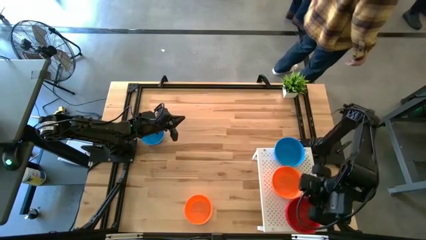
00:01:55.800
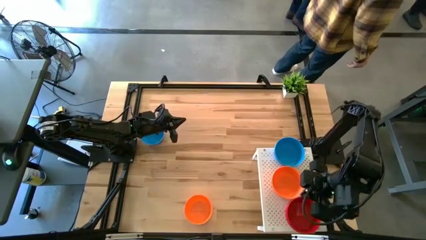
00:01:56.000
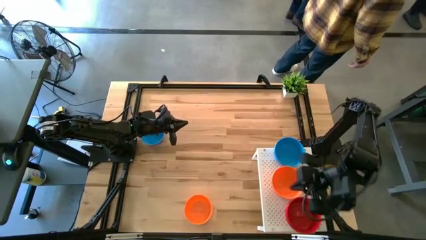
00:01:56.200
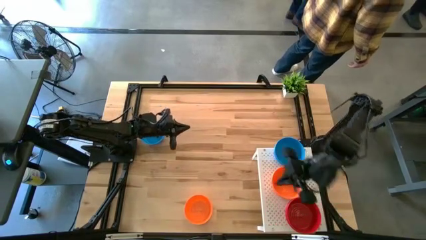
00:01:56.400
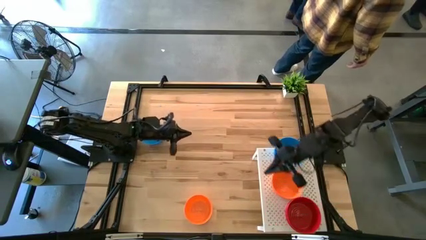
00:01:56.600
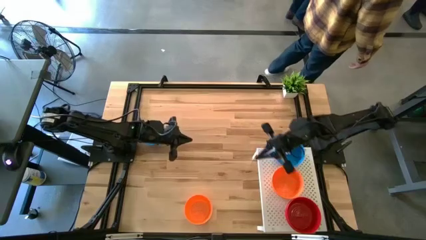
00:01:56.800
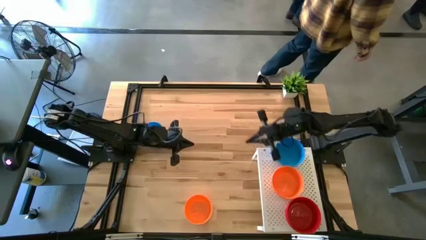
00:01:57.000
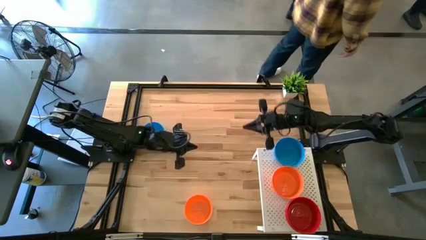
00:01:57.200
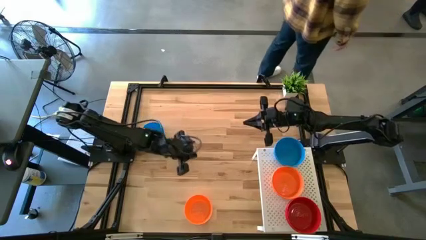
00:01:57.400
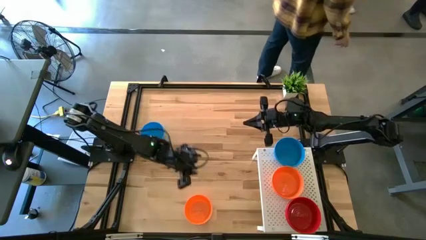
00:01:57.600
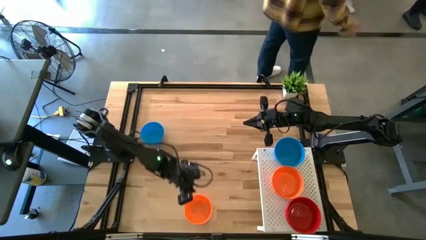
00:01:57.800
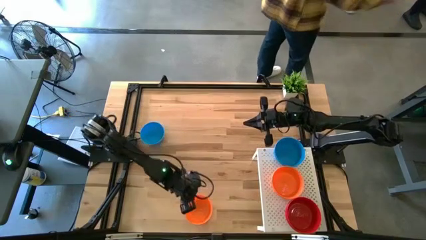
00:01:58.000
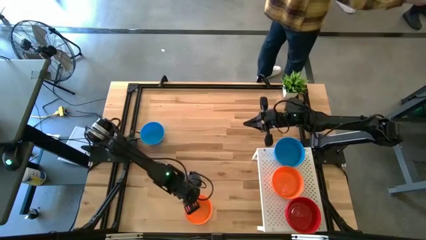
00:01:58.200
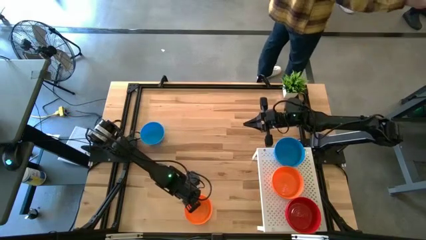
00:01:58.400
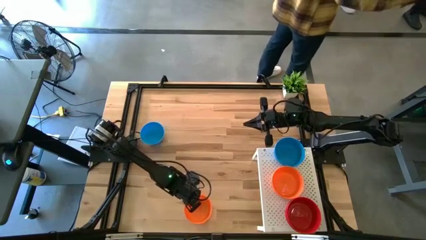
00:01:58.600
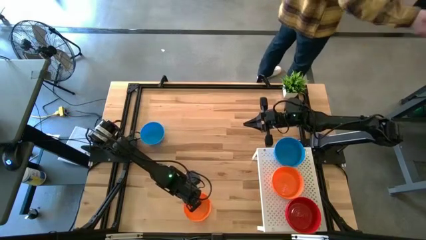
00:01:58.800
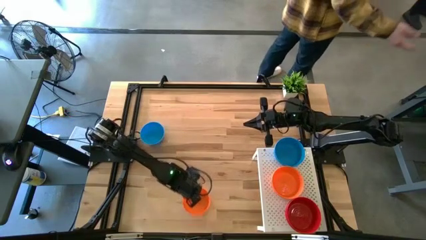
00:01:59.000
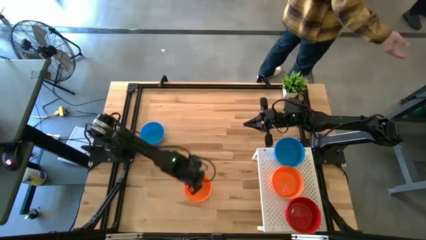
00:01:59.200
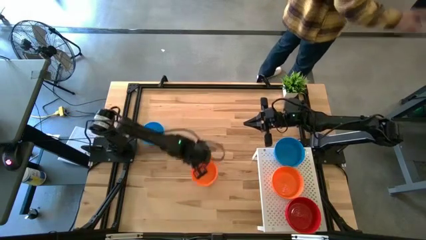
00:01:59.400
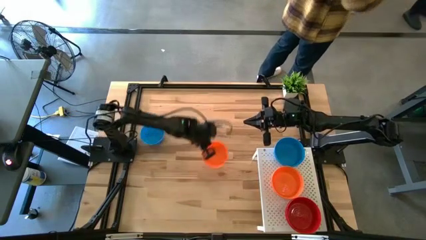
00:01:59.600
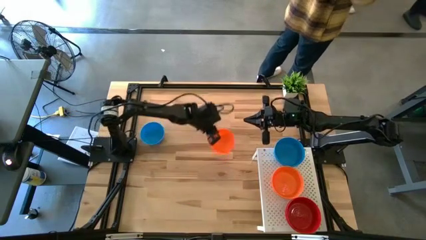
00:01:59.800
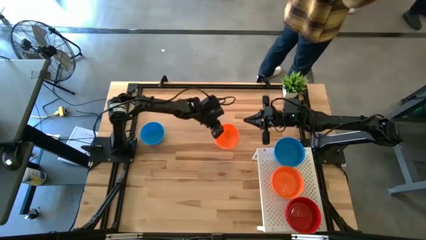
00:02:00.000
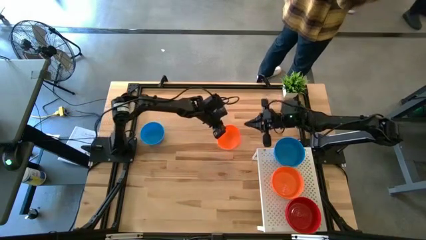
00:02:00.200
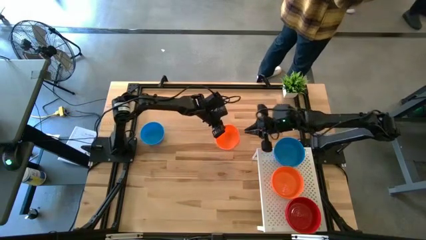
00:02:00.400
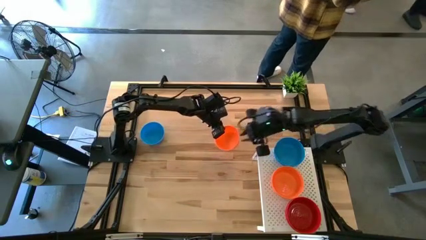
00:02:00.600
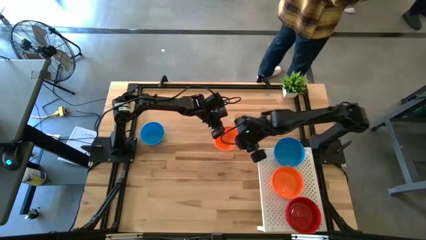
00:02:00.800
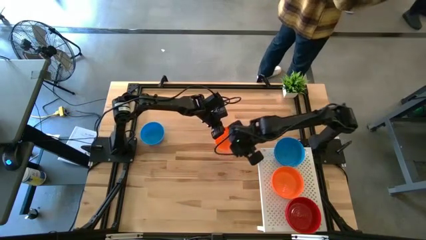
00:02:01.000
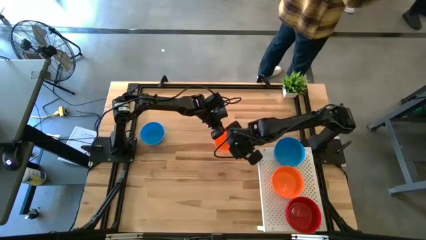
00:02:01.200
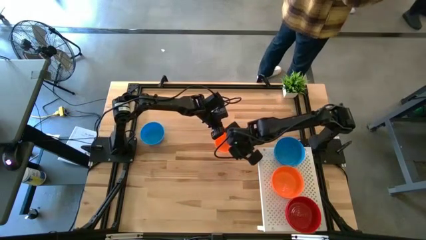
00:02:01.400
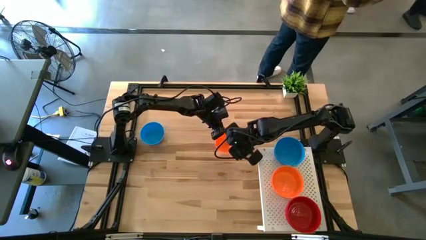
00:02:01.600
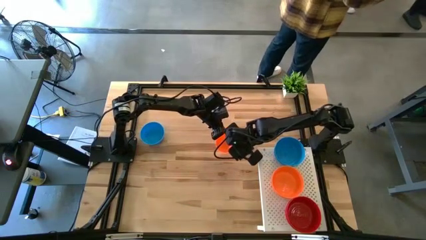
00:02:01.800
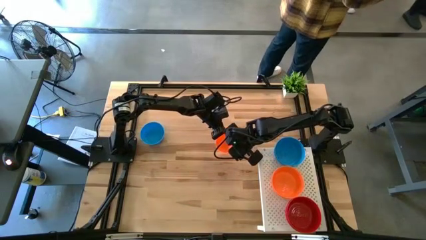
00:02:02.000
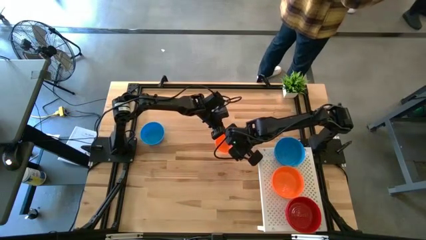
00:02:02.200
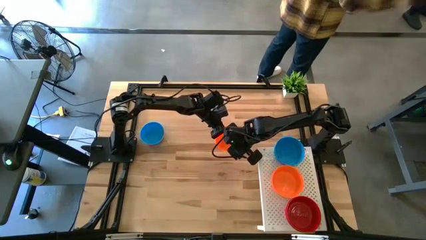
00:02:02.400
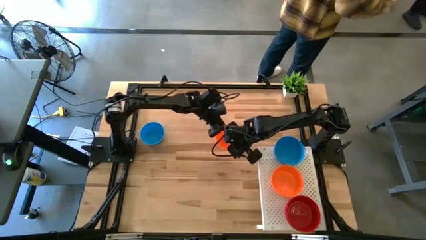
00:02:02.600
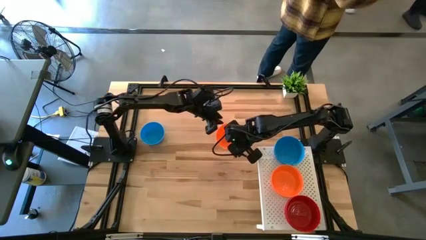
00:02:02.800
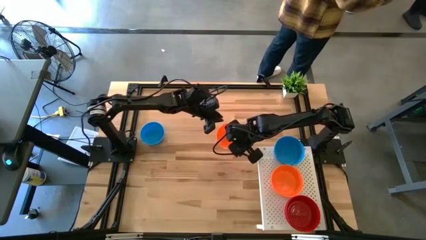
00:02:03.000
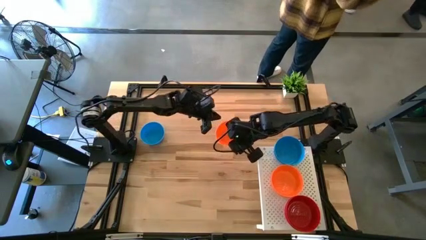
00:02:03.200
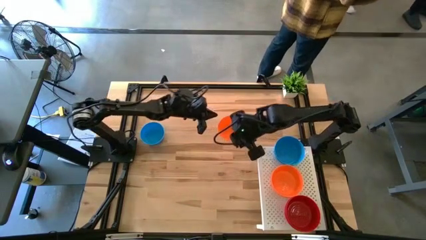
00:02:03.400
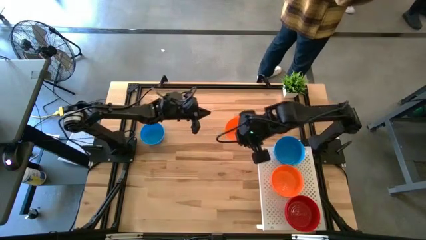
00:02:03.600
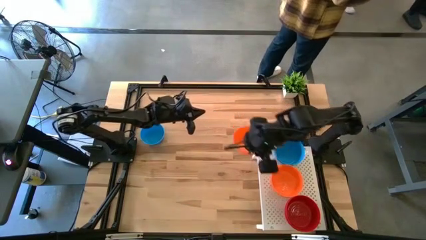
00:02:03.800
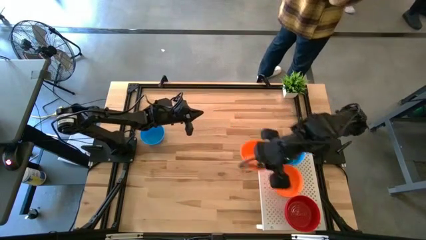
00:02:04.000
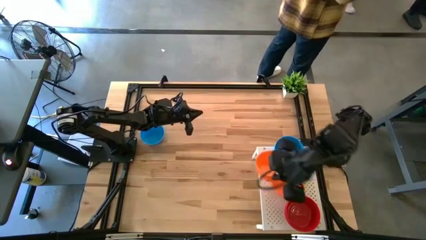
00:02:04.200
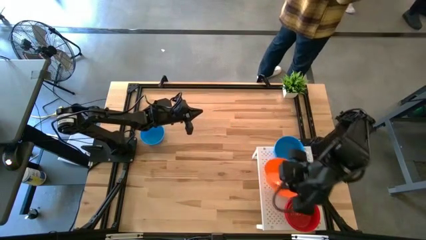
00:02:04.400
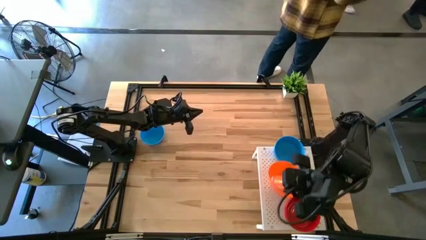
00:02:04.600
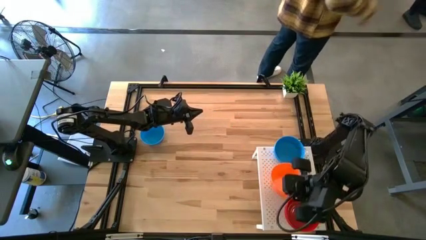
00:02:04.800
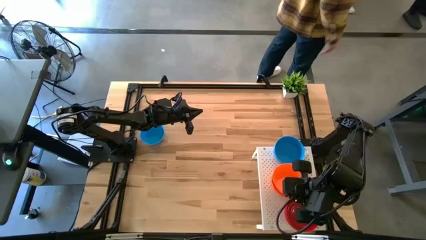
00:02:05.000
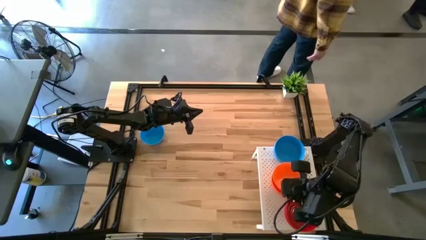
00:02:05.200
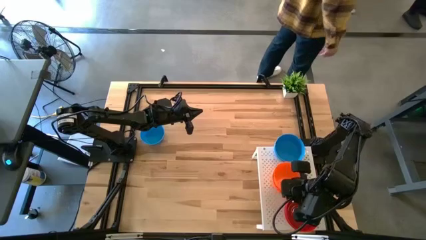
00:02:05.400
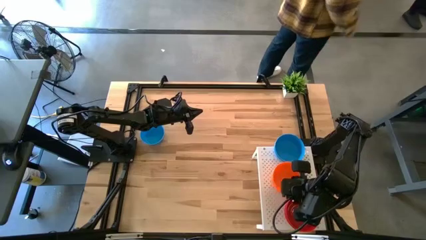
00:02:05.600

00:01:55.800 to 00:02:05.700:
Task: Pick & Place Mini bowls
Stack the orange bowl on top of the other orange bowl on the shelf

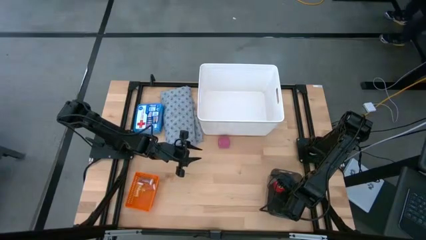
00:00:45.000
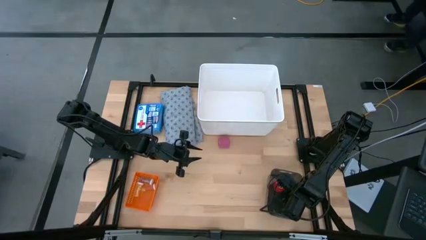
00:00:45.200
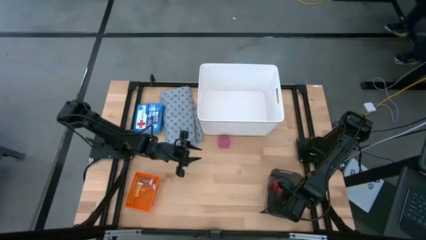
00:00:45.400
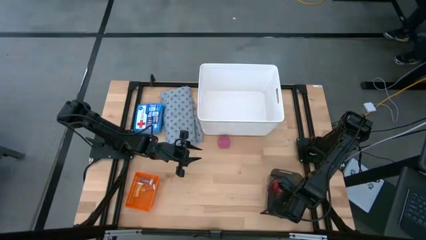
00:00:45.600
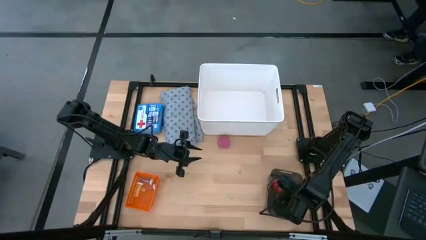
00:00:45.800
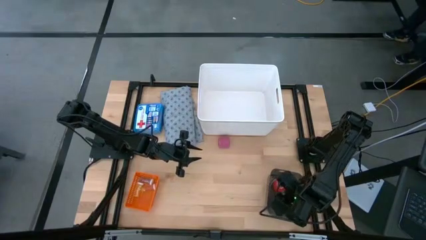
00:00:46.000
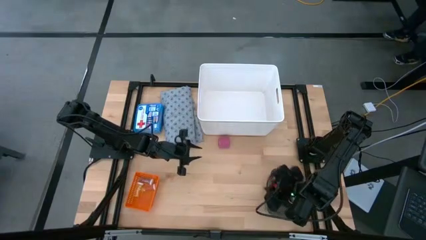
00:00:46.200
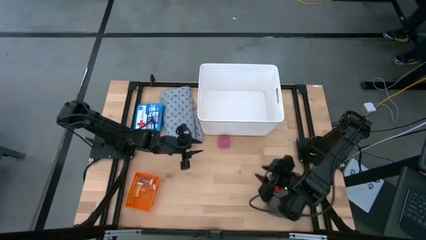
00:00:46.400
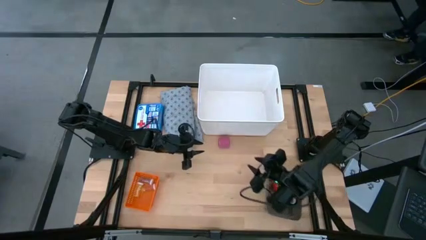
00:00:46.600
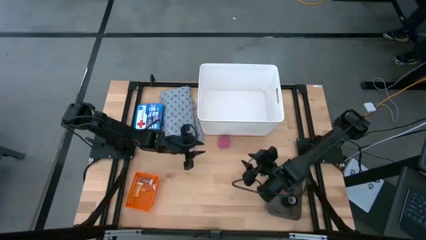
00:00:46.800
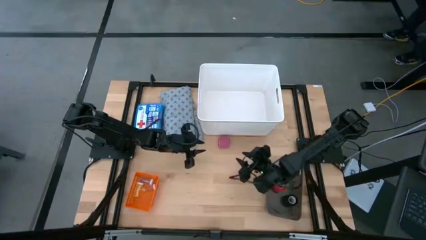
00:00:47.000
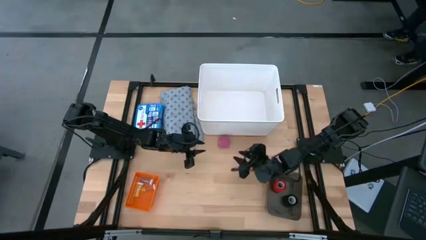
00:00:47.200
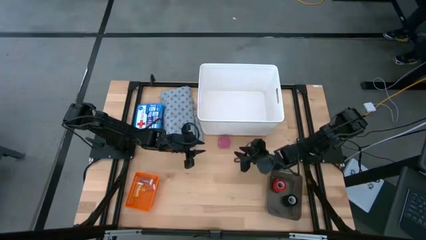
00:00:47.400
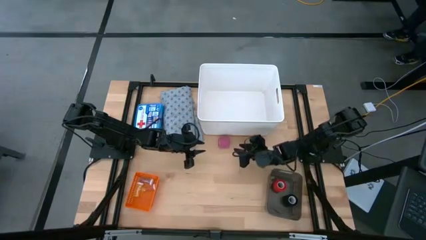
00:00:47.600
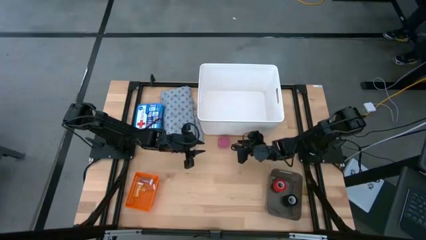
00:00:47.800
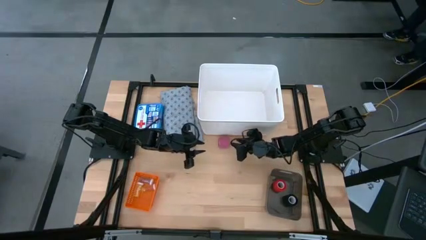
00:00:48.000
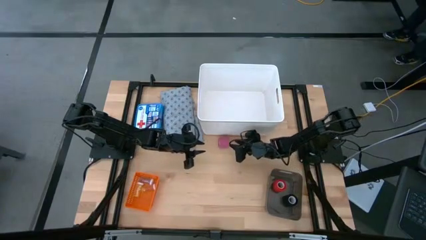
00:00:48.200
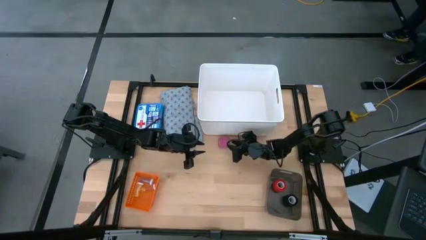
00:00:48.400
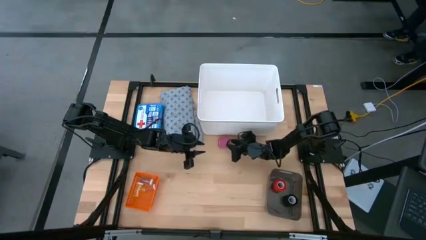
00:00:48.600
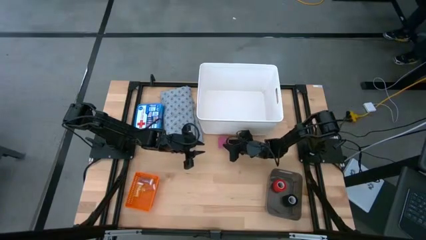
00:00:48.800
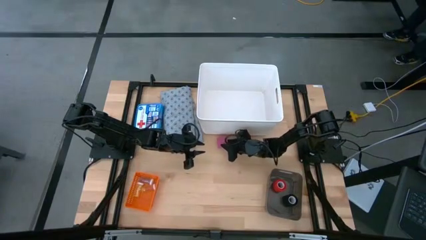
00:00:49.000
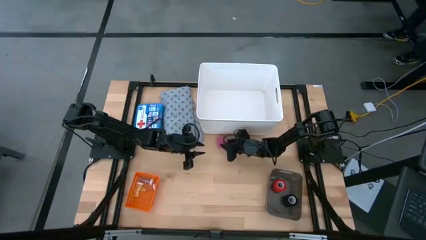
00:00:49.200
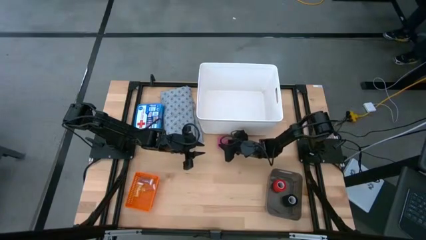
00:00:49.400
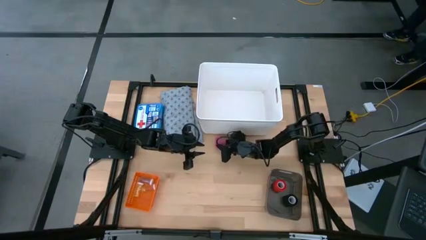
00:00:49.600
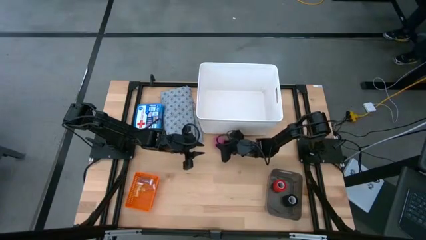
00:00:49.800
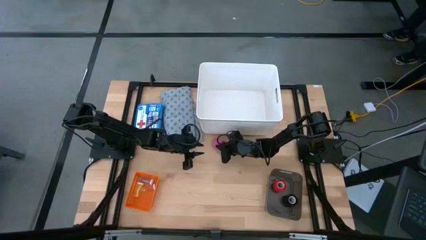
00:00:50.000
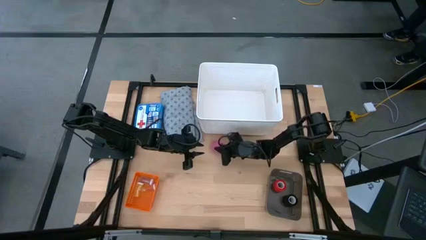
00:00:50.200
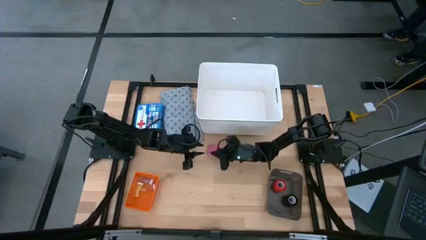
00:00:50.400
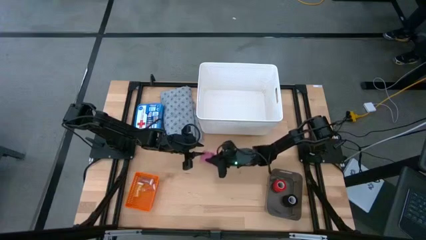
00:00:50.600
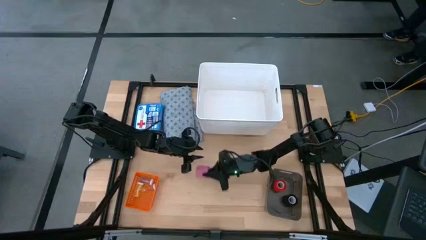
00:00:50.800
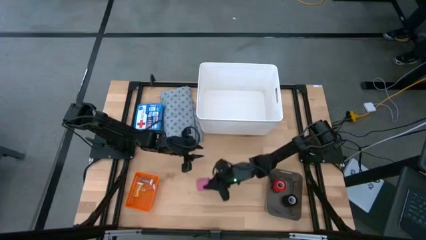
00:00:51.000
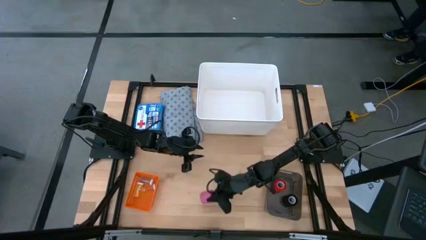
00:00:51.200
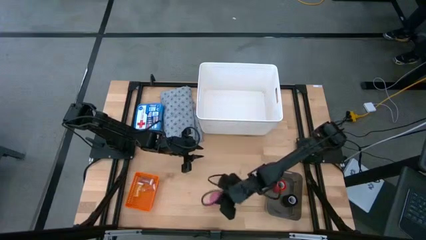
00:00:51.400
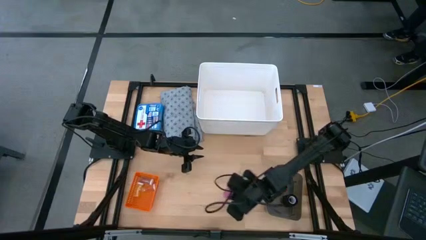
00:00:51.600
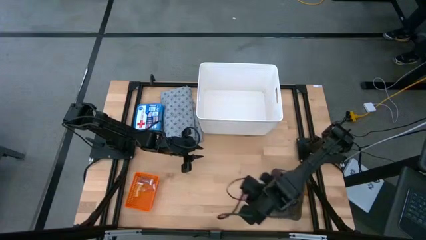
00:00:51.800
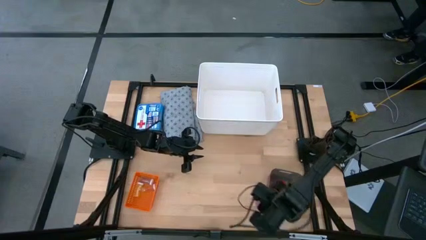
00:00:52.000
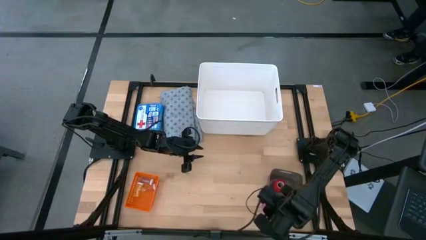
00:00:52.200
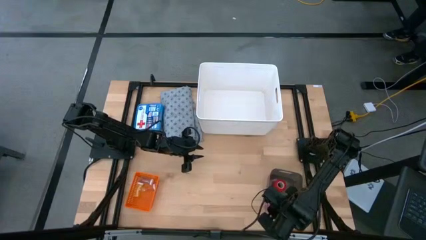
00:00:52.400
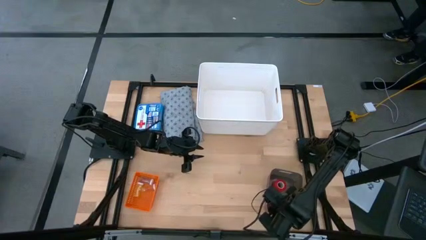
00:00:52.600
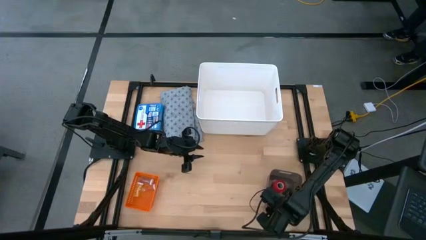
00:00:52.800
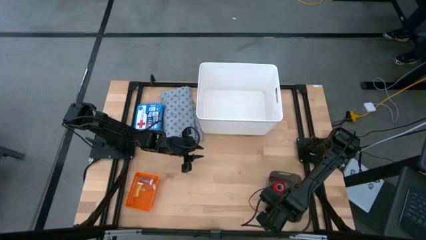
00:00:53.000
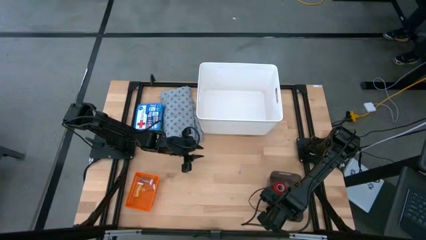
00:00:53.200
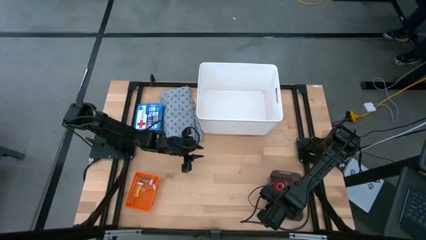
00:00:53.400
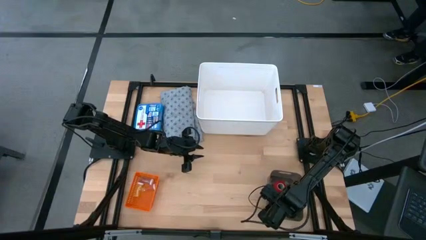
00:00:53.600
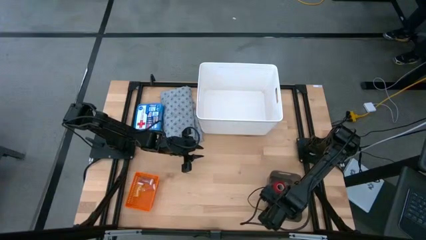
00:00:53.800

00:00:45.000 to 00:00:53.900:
Task: Pick & Place Medicine items
Put the pink bandage into the black bin
